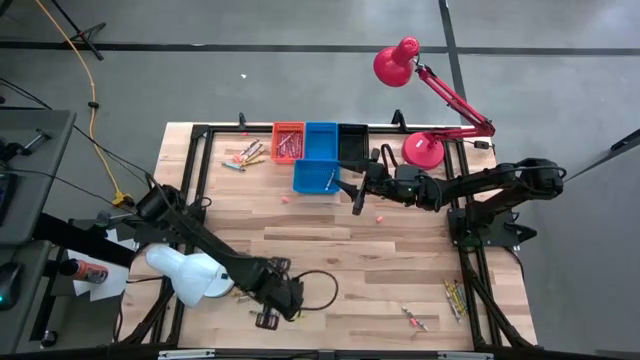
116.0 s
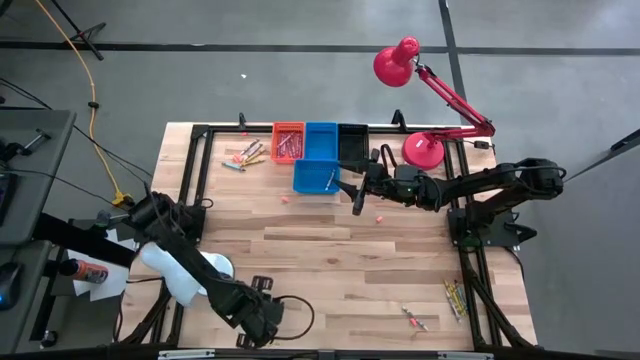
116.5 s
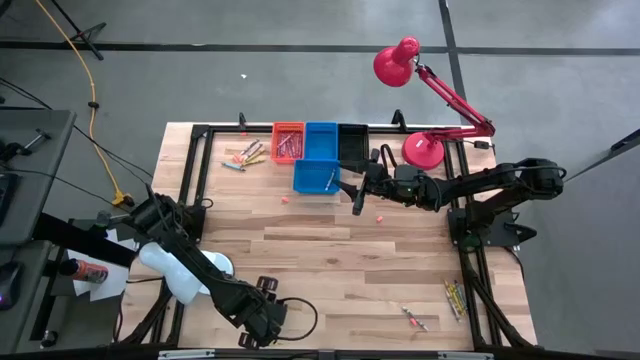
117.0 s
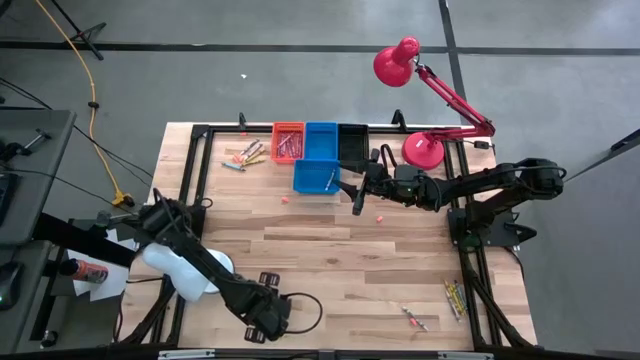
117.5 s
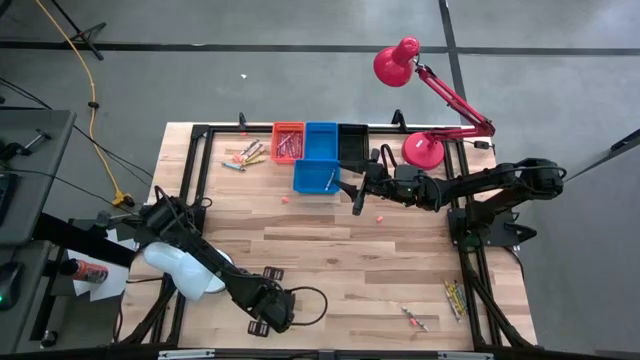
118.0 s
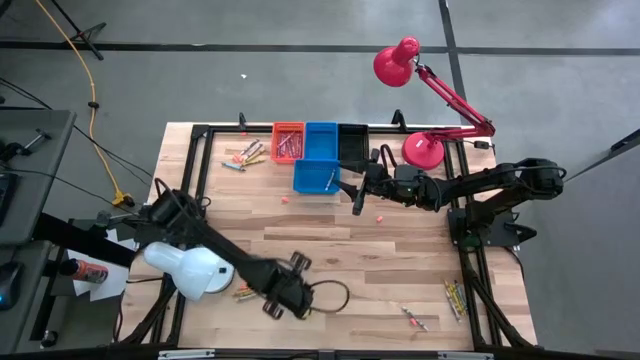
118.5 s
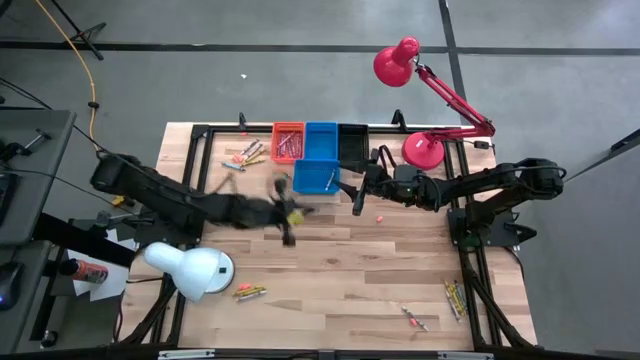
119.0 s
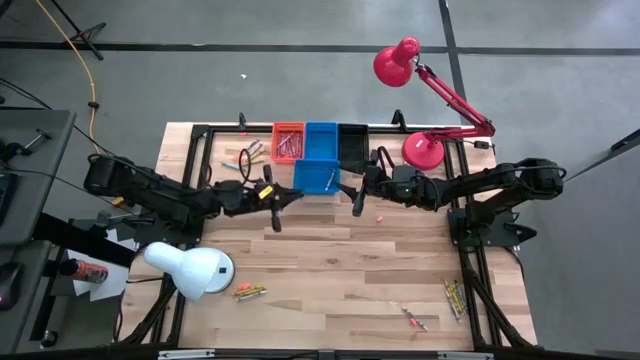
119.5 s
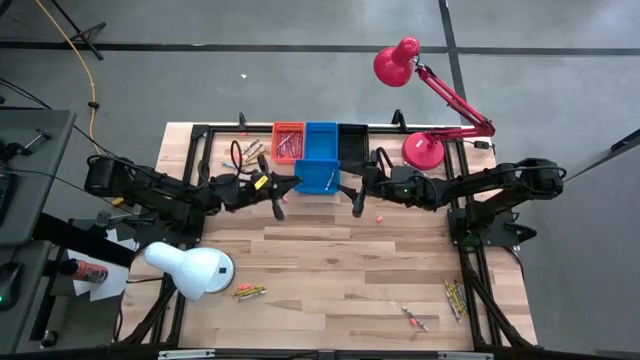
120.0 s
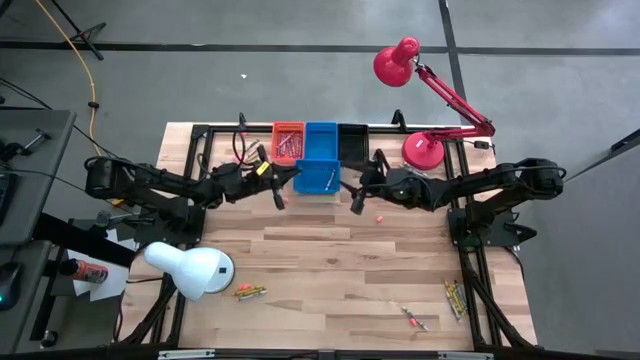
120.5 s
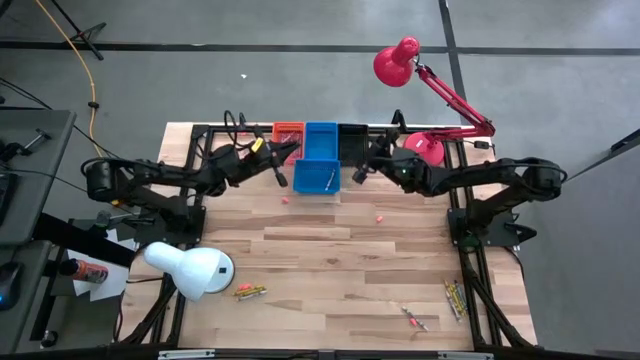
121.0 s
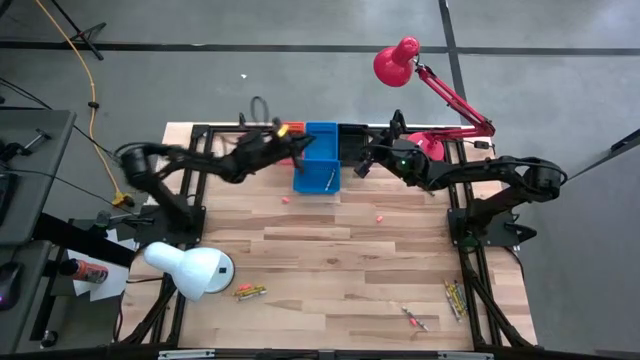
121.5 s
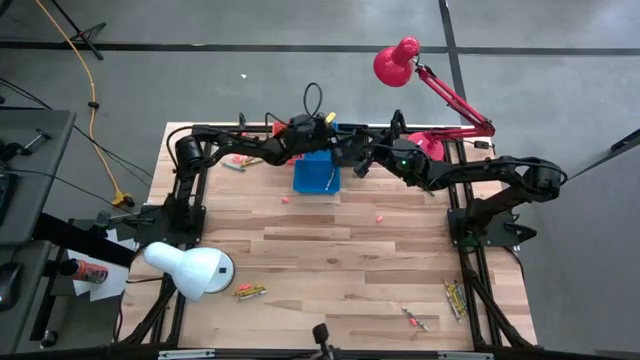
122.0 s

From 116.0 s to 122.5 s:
Task: Sort crayons
Put the blue crayon into the black bin

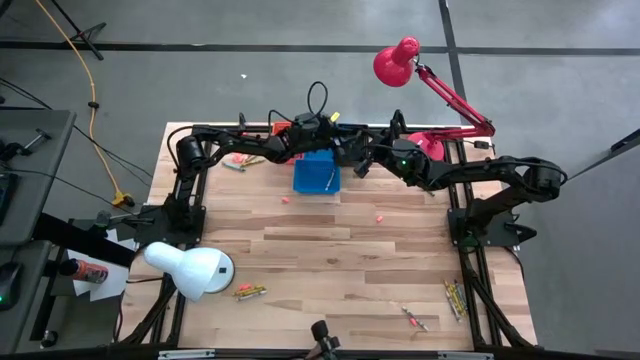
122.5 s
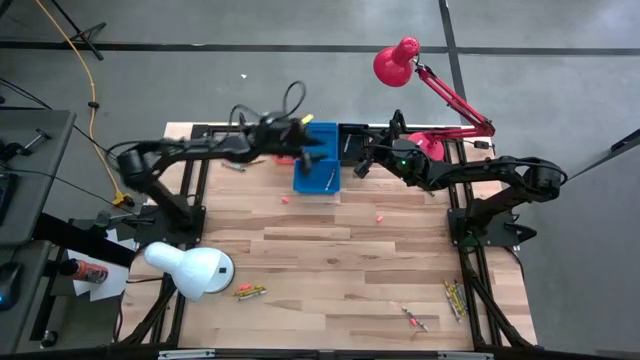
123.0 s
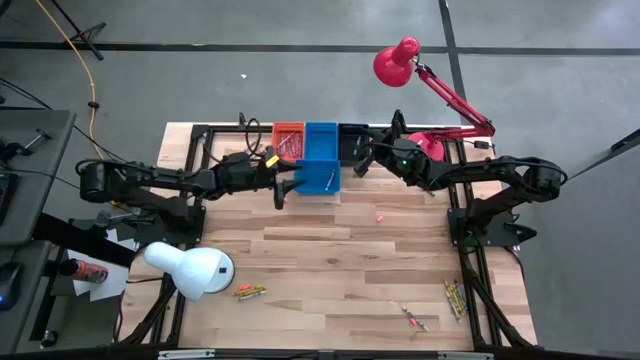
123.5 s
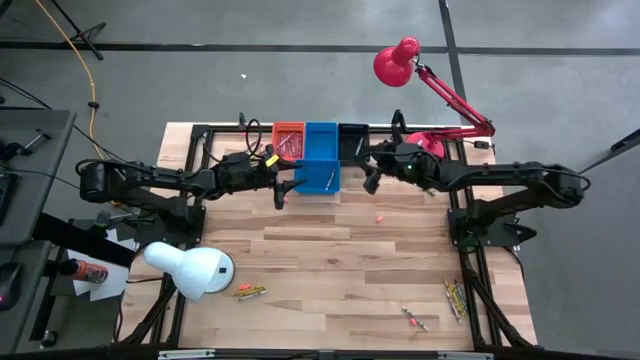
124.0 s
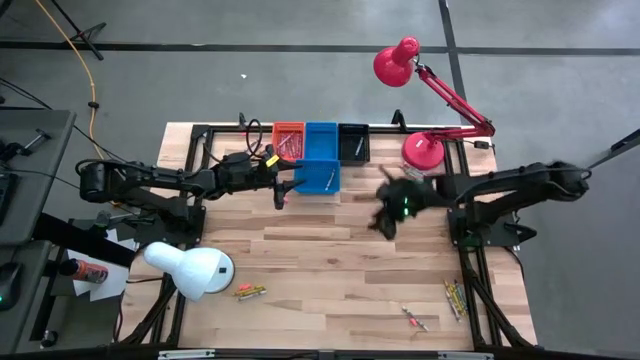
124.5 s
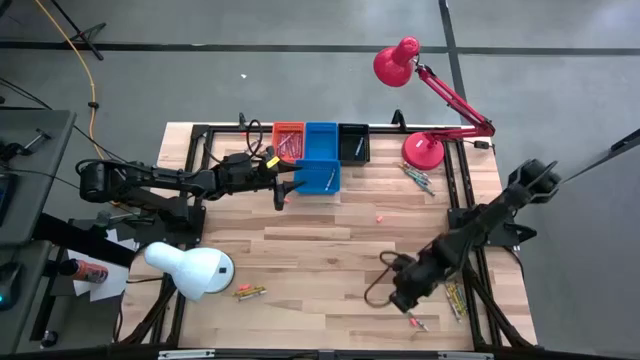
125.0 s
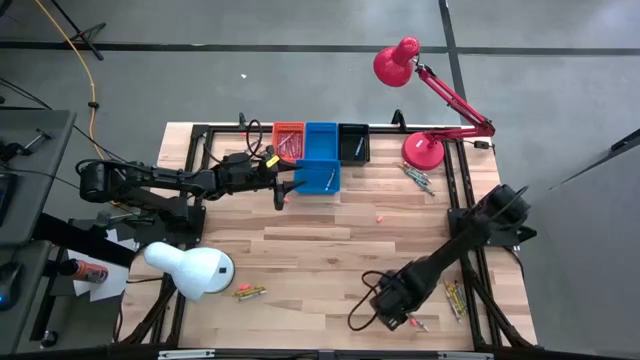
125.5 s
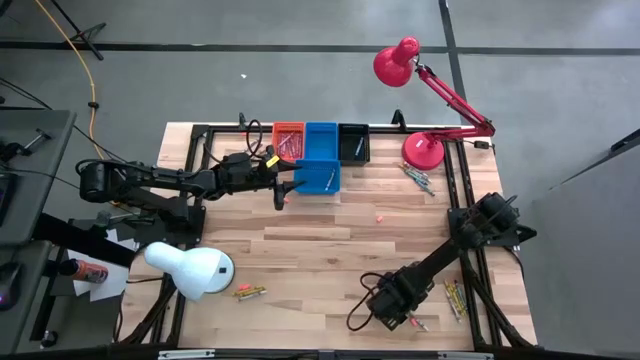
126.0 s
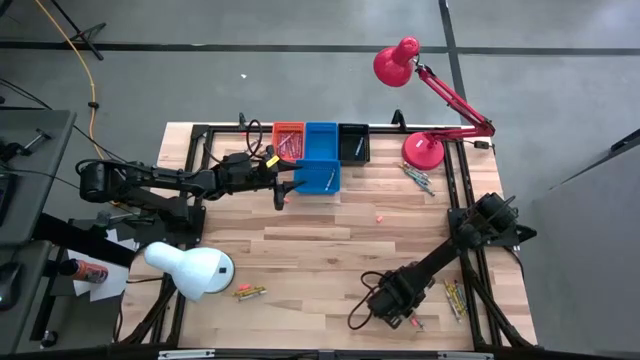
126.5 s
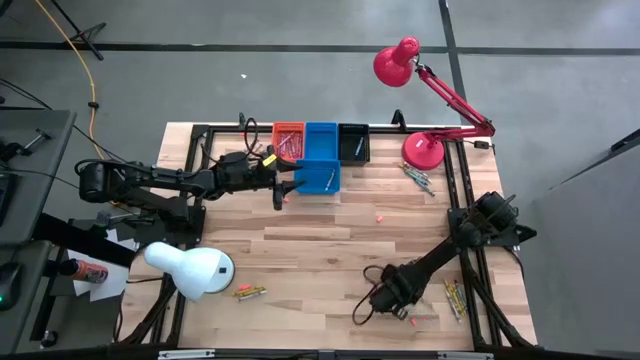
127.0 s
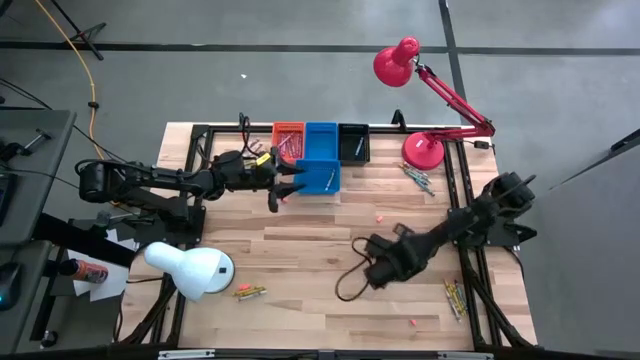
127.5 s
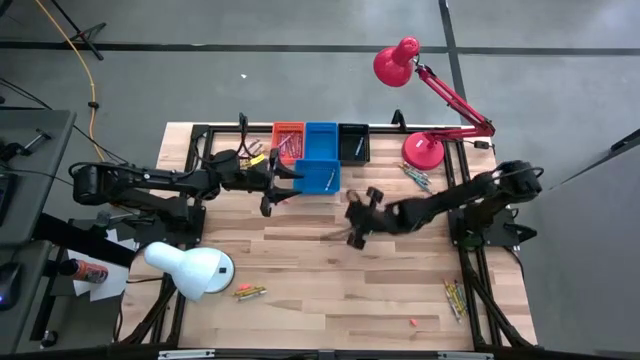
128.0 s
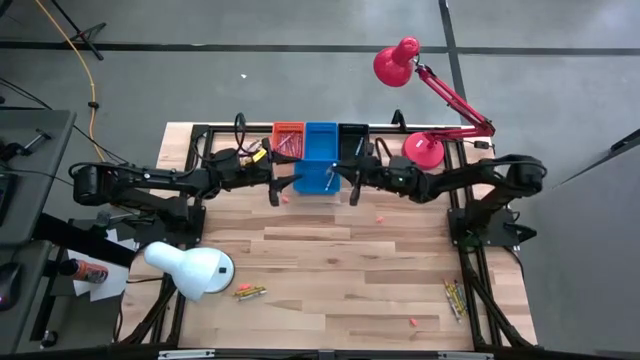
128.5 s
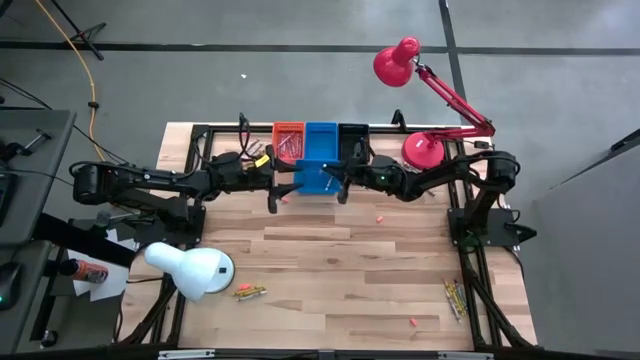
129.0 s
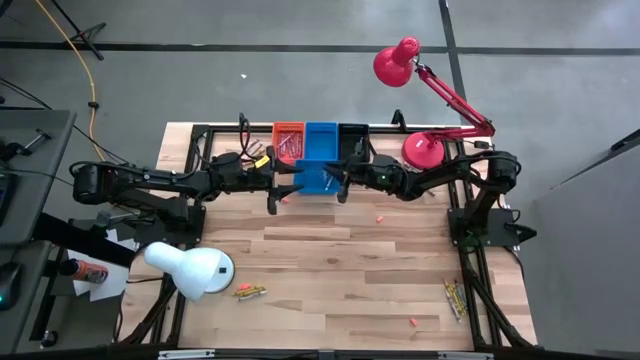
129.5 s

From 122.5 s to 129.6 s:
Put the white crayon into the bottom blue bin

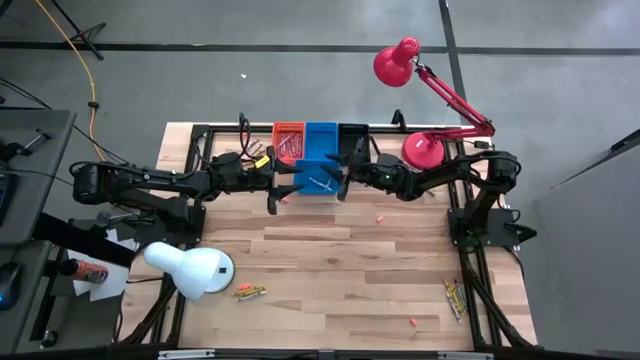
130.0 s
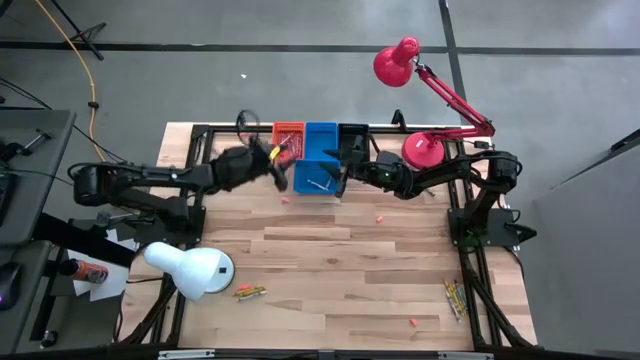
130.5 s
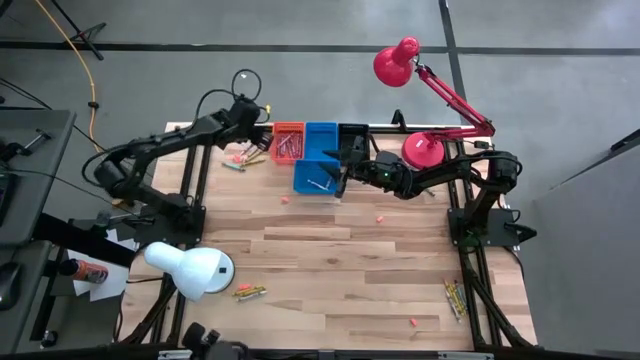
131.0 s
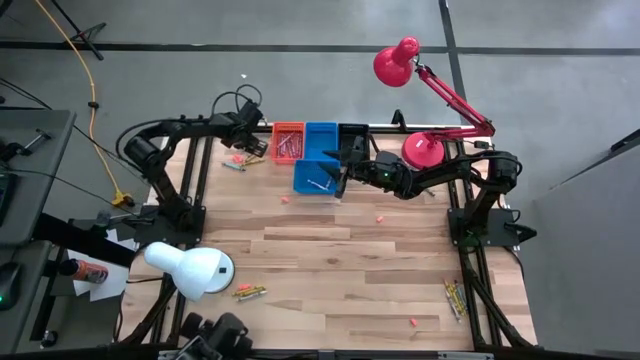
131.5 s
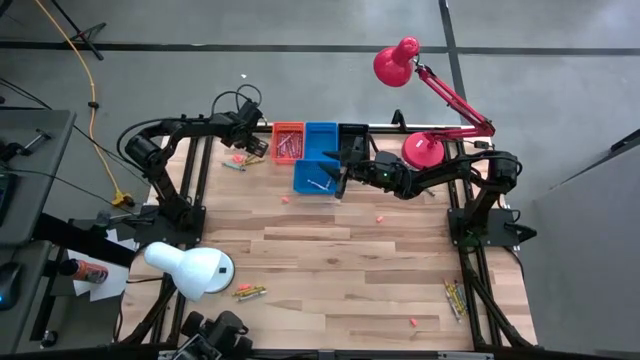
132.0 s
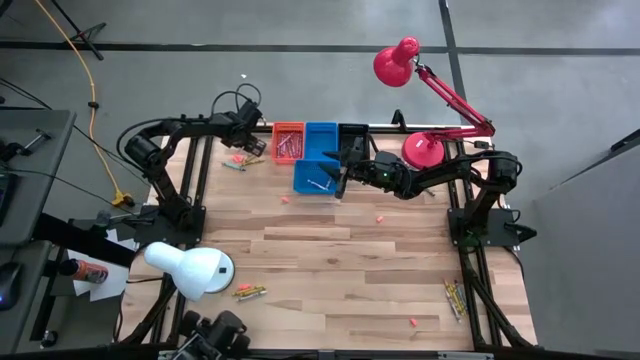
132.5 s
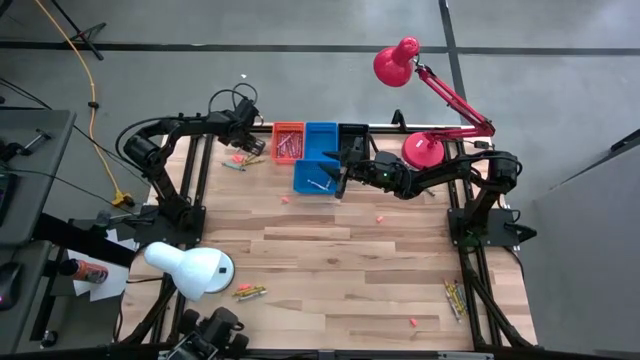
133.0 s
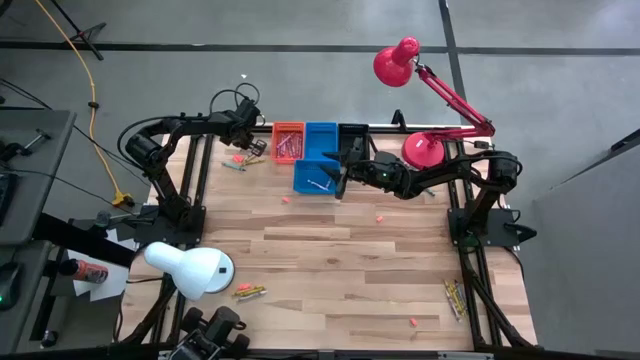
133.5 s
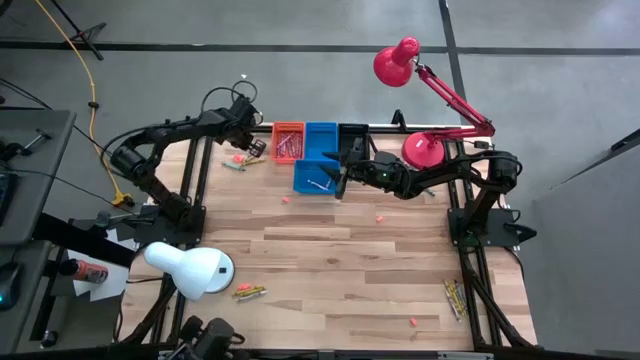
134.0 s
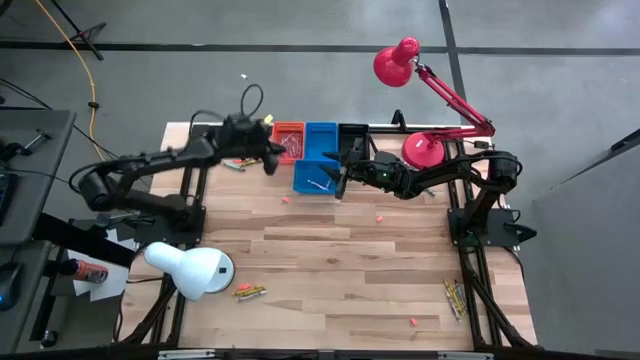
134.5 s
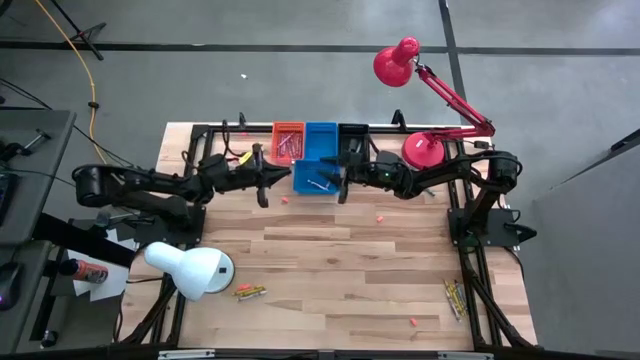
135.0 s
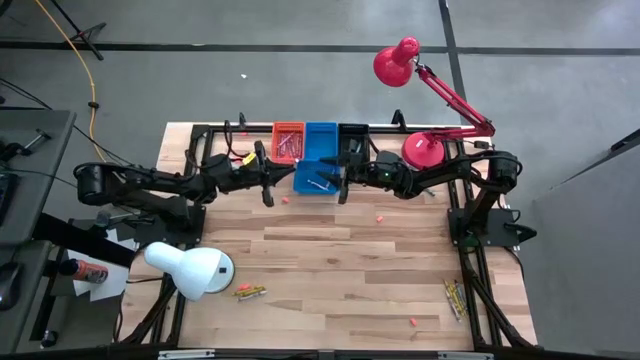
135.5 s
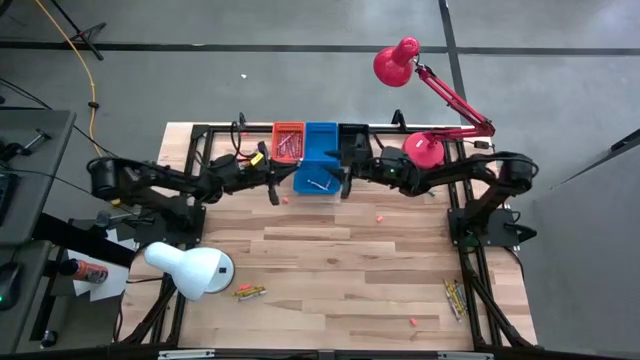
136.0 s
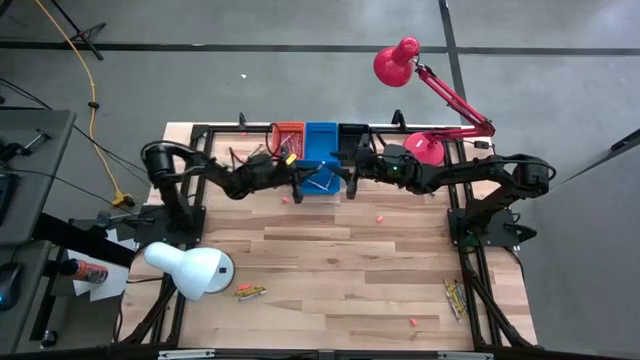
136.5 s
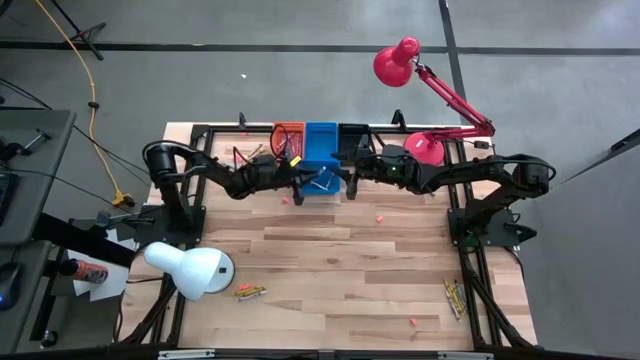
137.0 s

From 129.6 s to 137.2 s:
Put the white crayon into the bottom blue bin
